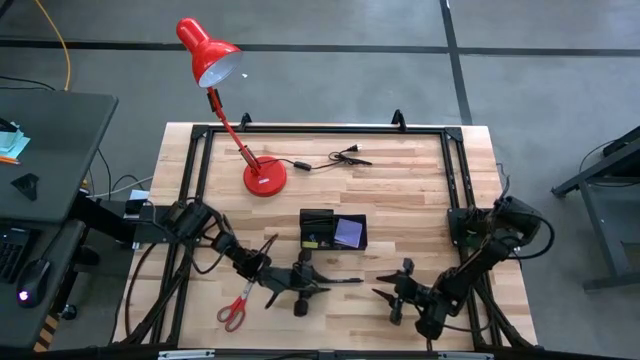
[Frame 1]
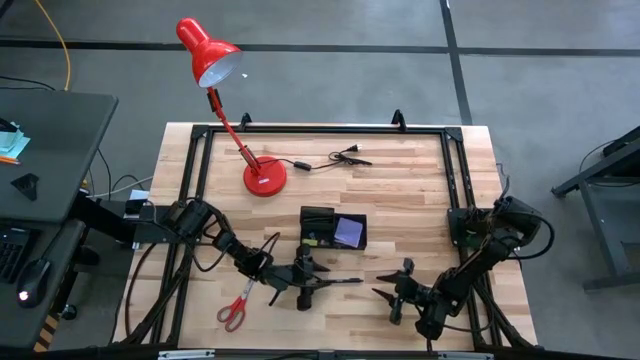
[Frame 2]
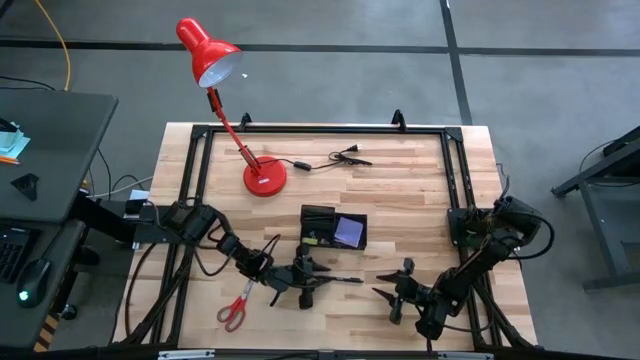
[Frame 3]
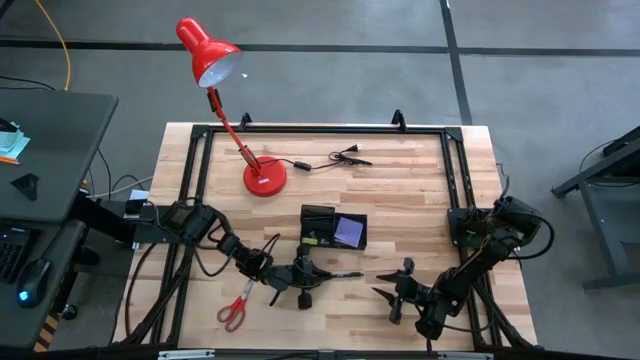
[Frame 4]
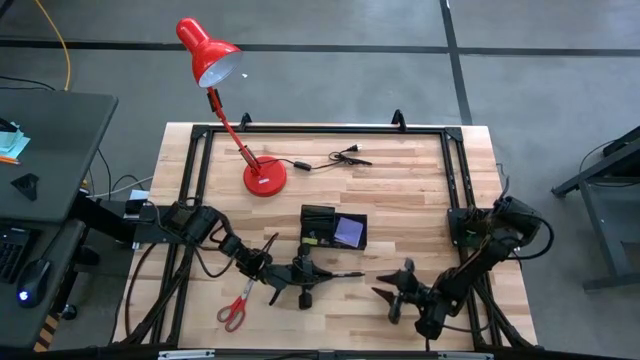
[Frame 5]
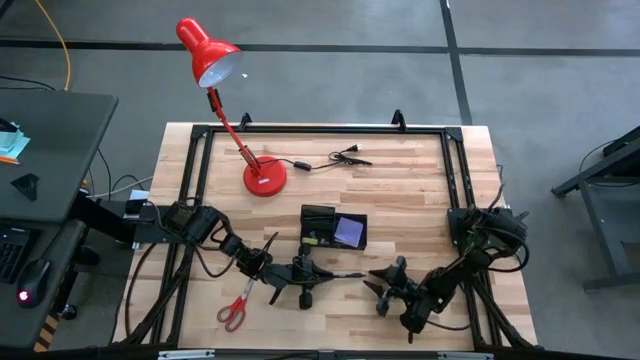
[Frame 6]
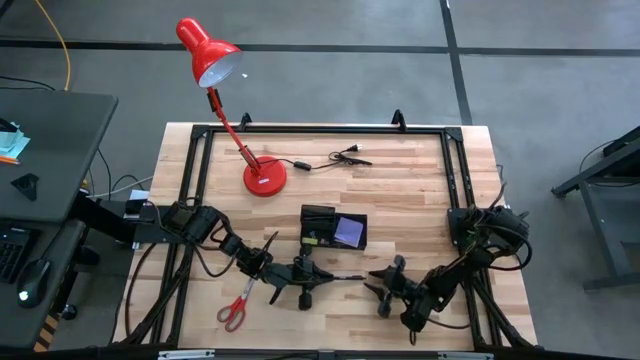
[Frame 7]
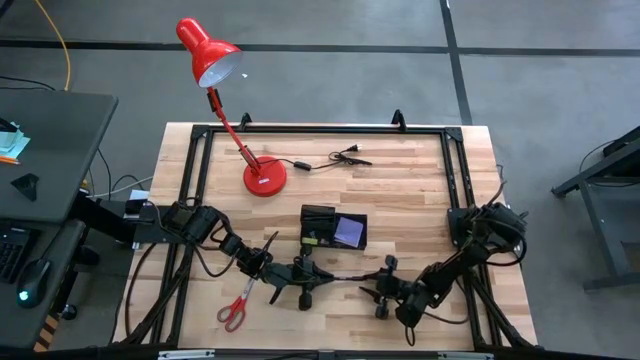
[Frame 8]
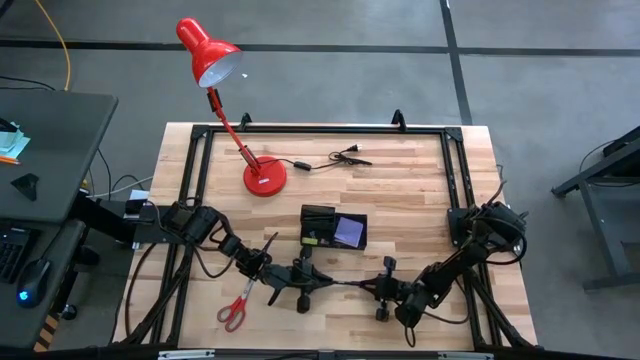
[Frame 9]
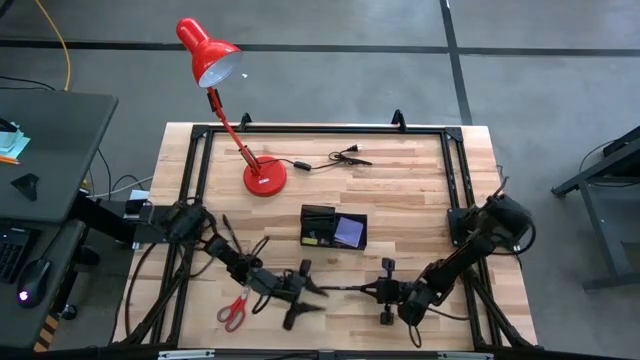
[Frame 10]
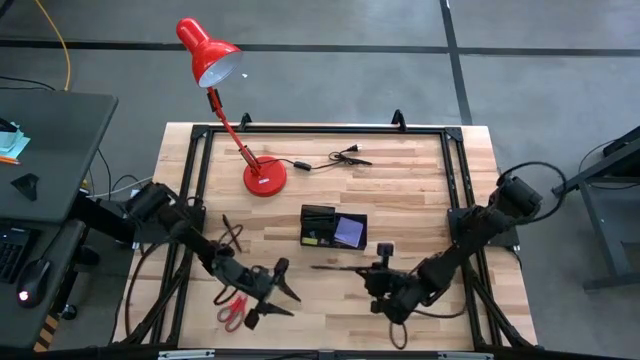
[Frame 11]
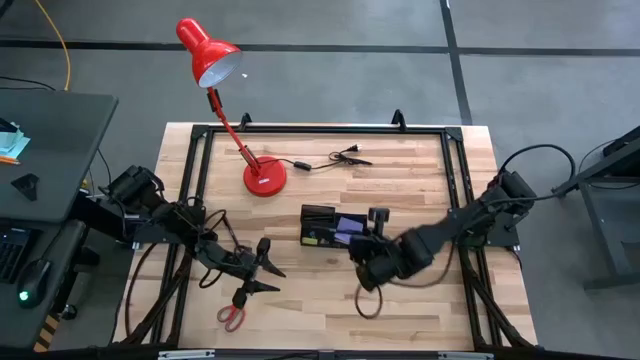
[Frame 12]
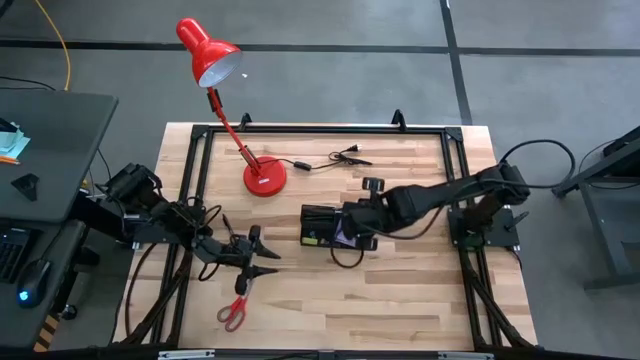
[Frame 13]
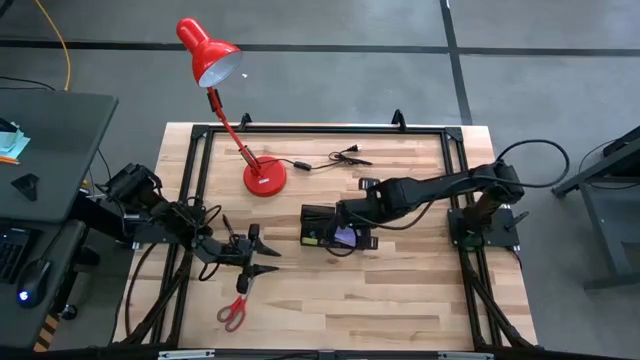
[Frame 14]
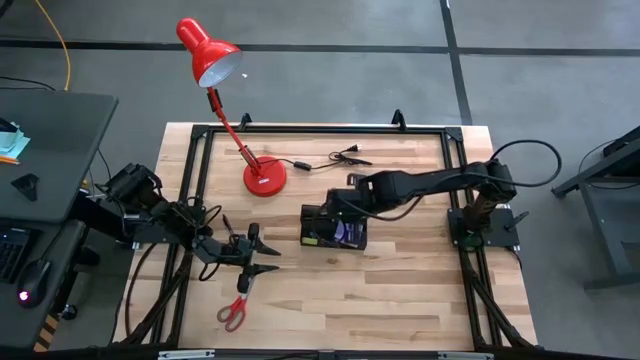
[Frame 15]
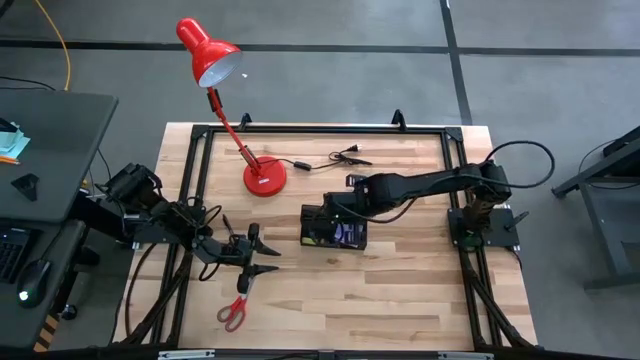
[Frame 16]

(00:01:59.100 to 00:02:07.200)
Task: Pick and place office supplies into organizer
Put the black pen into the black desk organizer

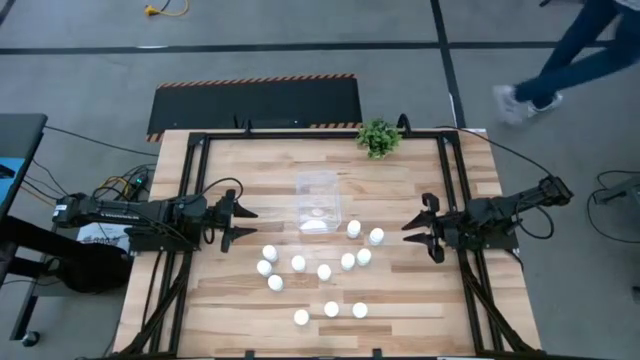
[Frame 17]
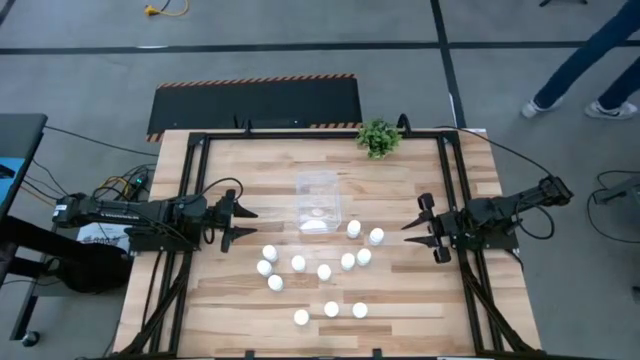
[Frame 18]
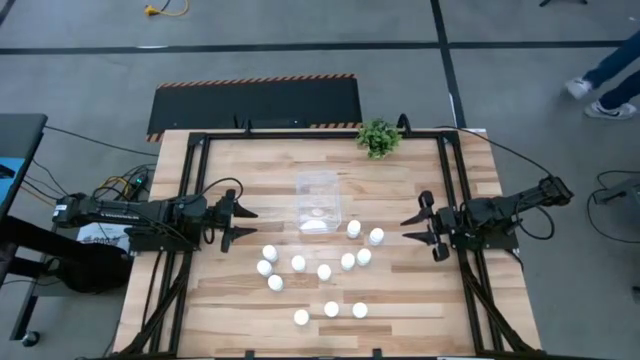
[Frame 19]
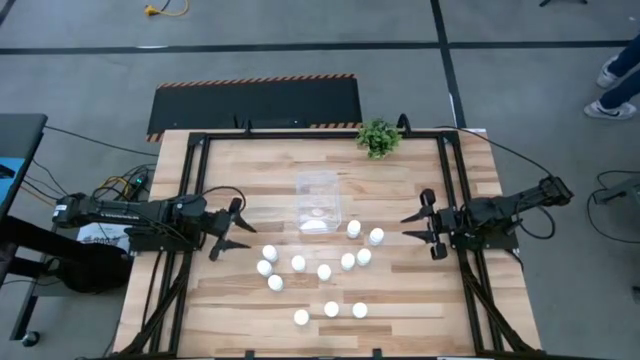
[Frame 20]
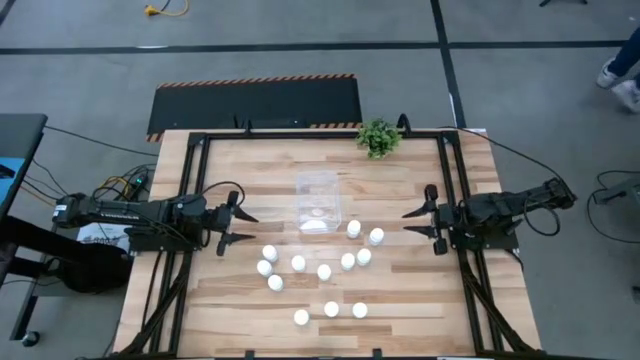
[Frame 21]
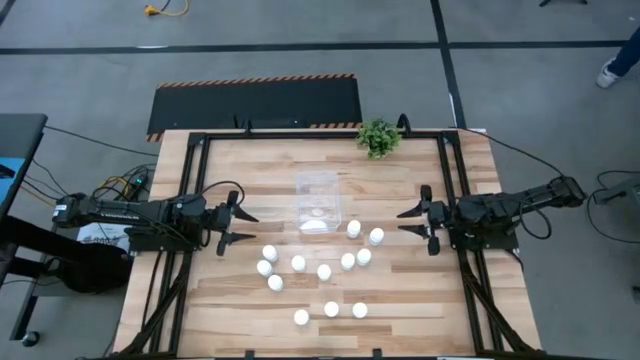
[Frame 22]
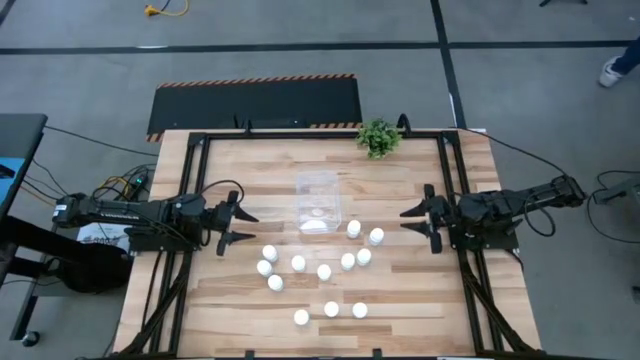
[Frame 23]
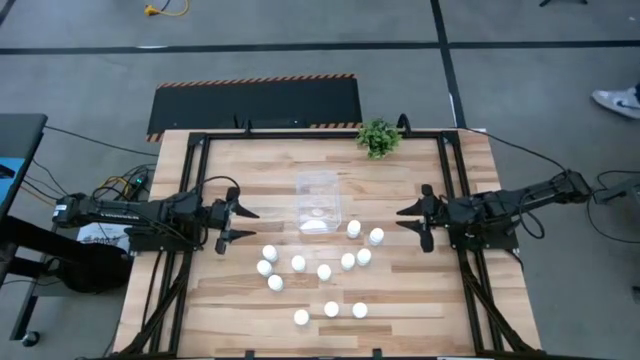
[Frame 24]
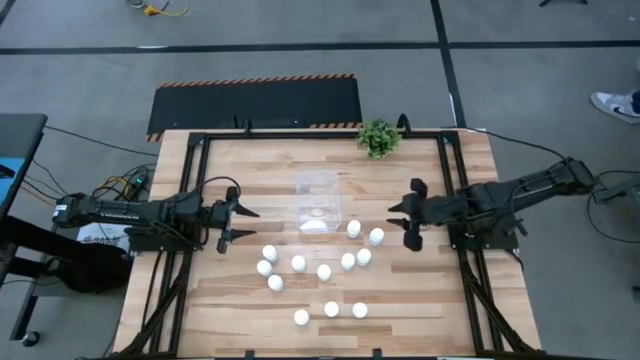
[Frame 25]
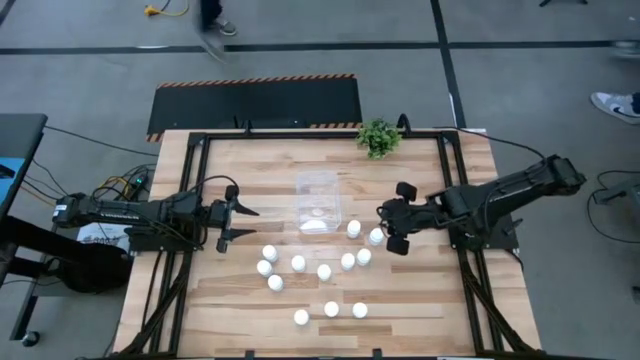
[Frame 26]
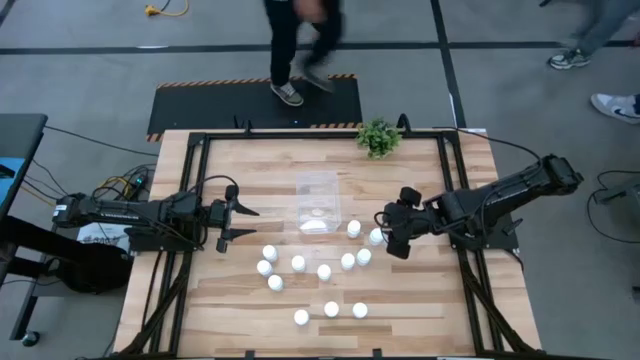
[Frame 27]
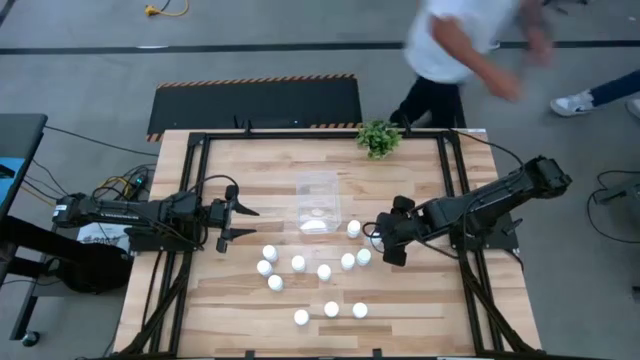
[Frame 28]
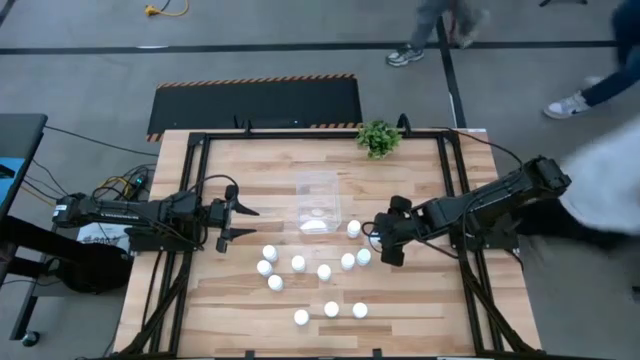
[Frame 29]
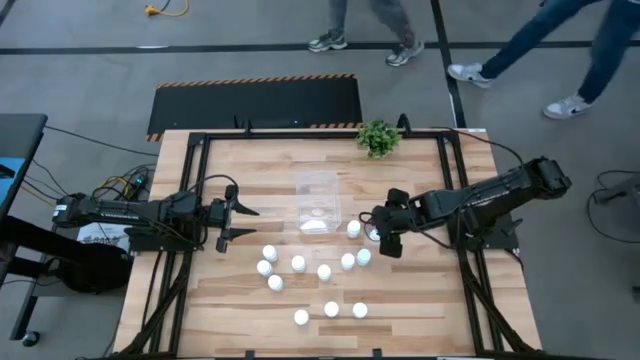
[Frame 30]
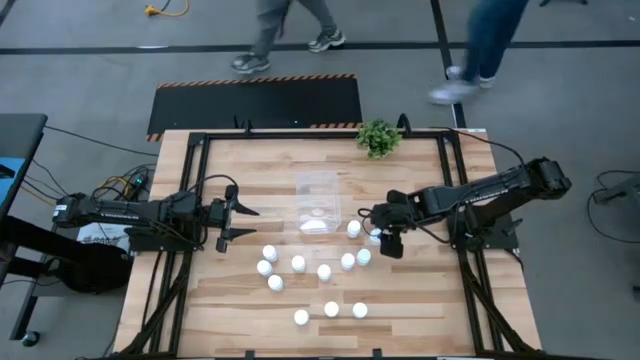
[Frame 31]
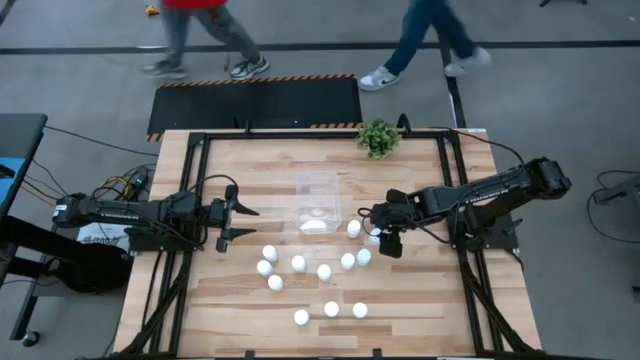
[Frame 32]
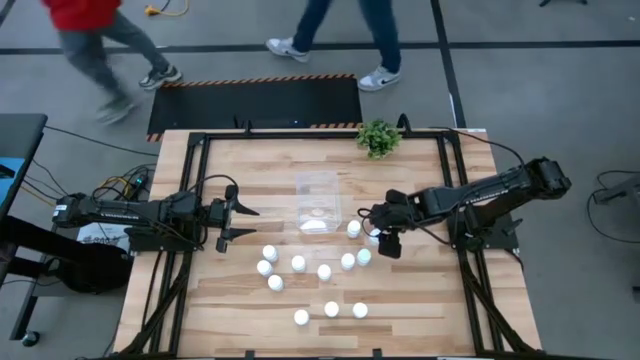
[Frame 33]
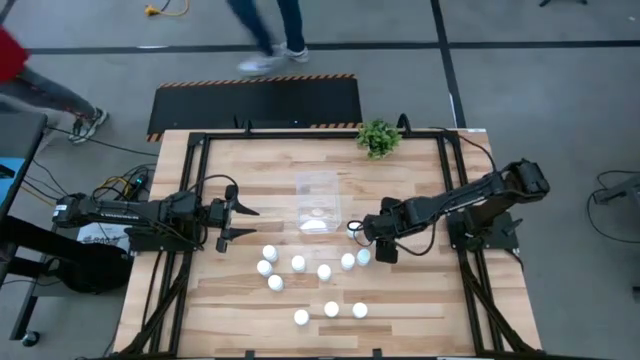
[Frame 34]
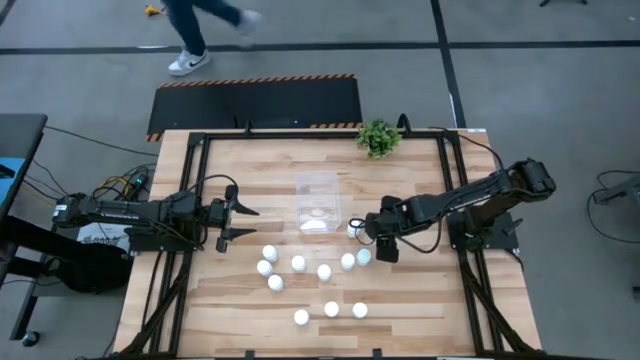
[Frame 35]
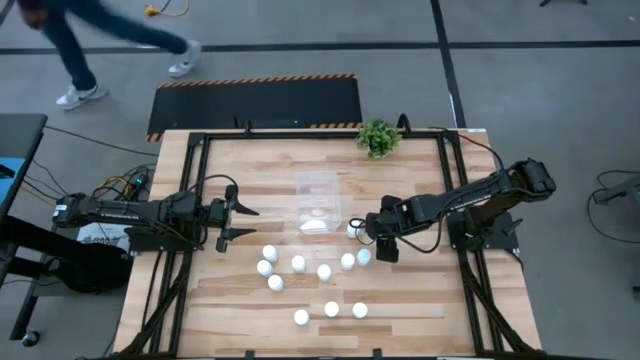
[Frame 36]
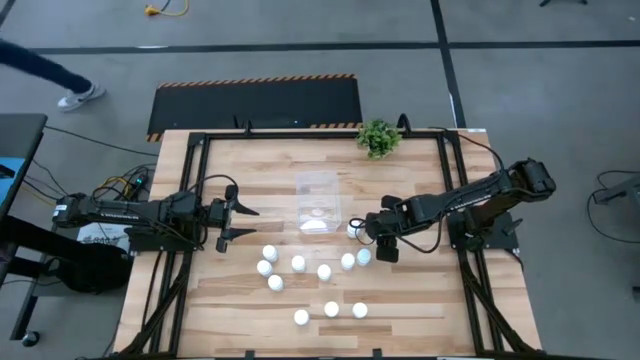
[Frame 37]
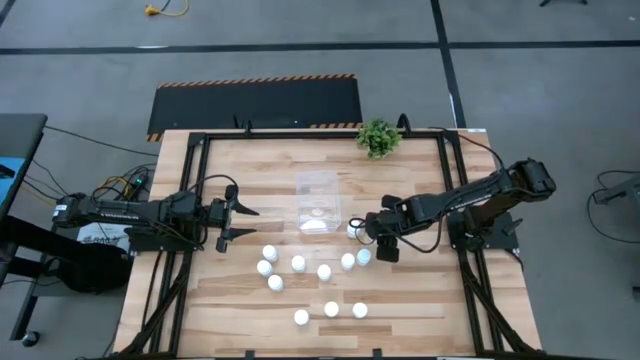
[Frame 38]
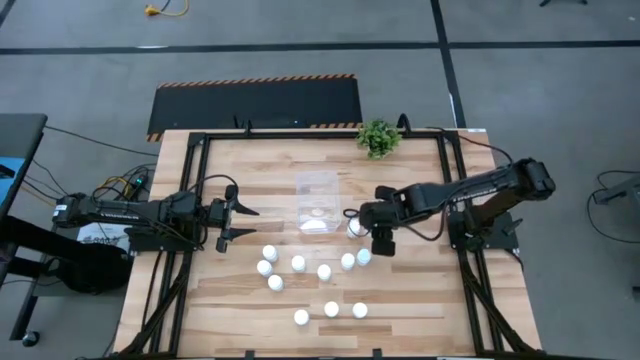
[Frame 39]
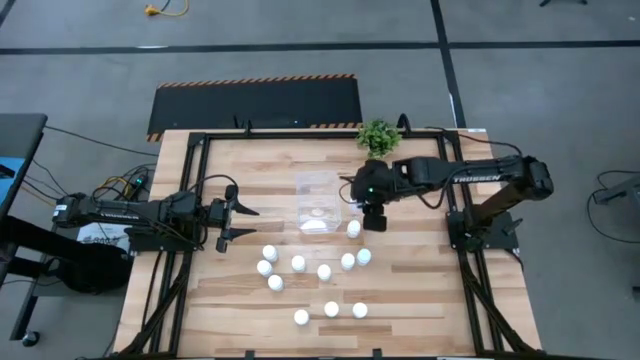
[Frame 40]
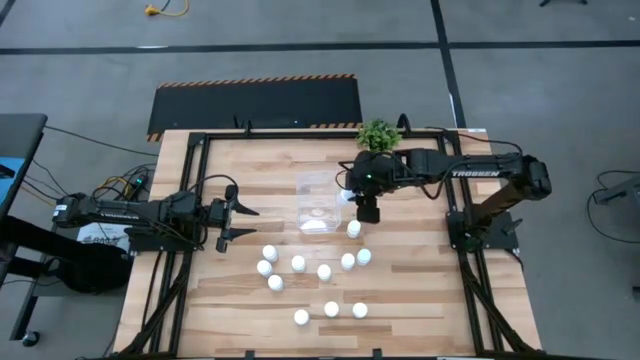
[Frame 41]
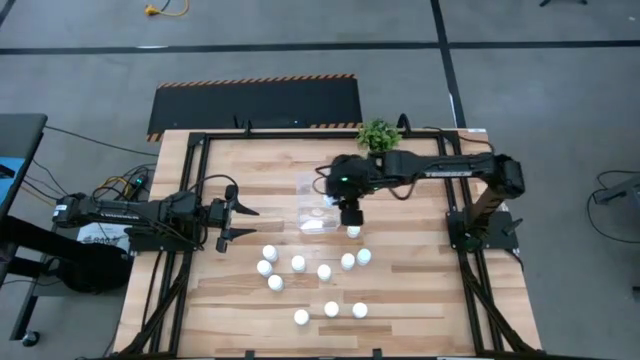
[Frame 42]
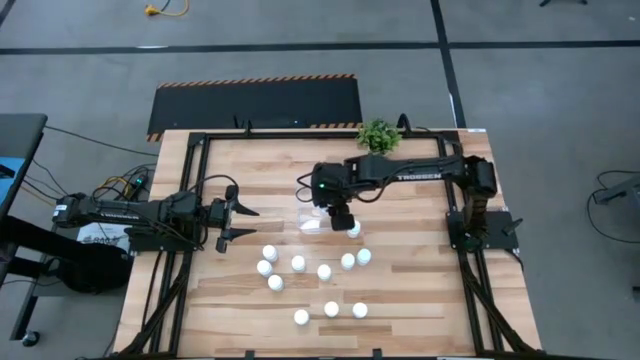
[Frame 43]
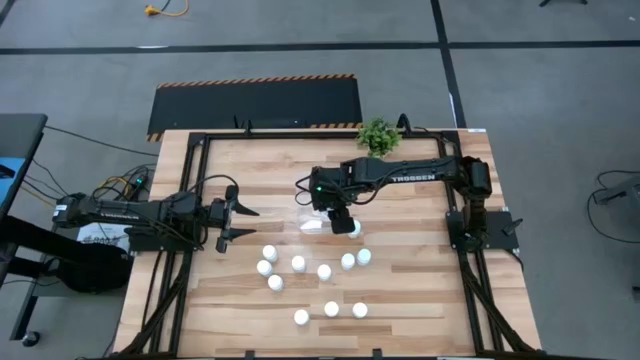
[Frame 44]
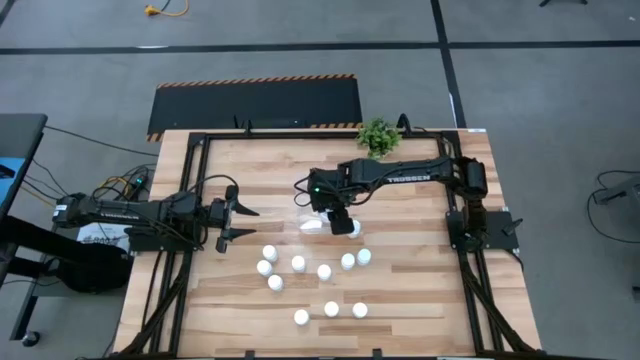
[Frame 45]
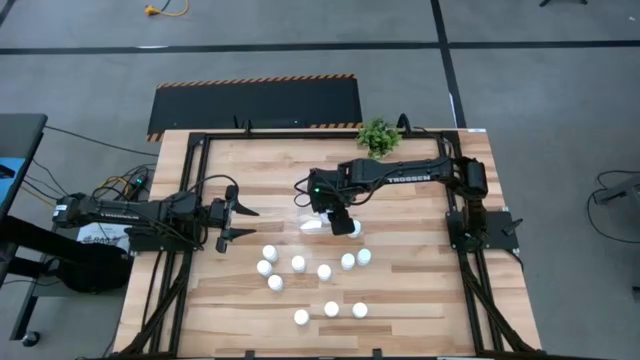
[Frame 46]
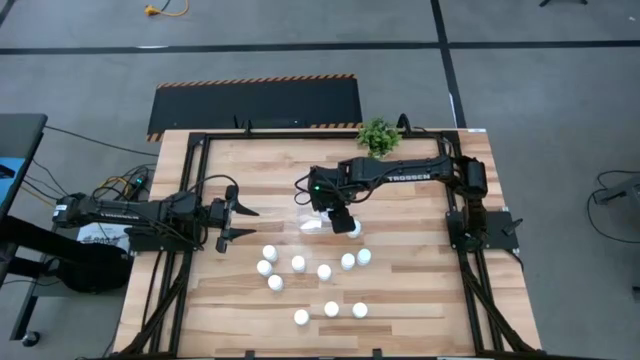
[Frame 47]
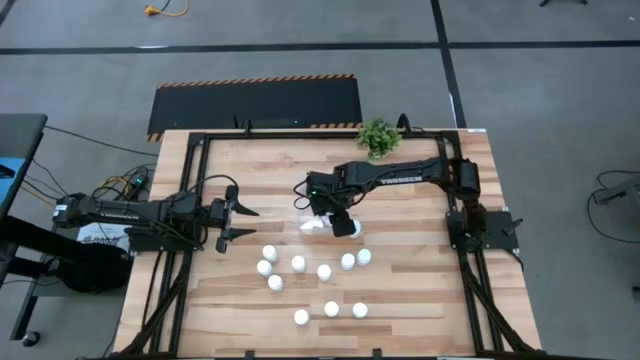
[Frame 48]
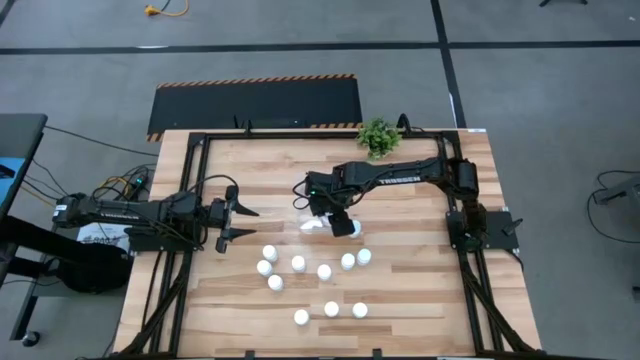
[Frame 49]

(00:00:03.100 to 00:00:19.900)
Task: Pick and place pill bottles into a basket
Put the pill bottles into the container
